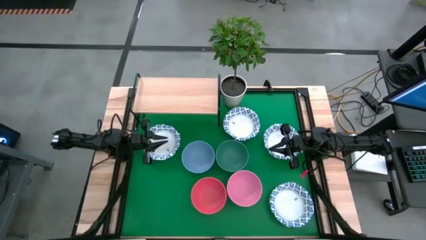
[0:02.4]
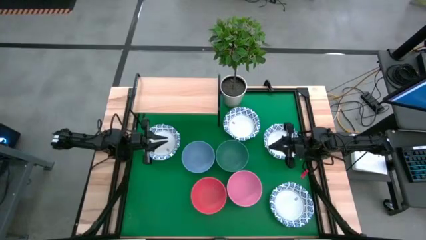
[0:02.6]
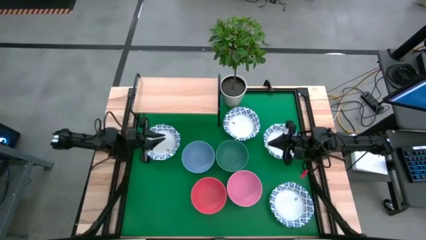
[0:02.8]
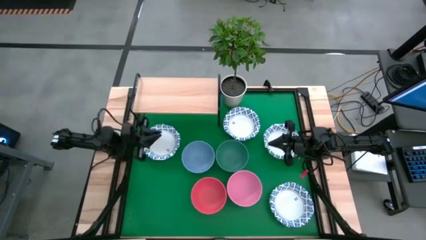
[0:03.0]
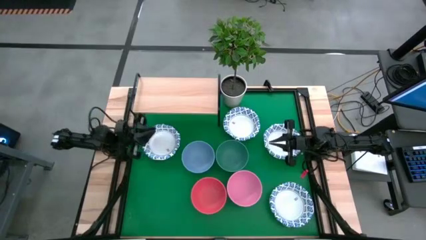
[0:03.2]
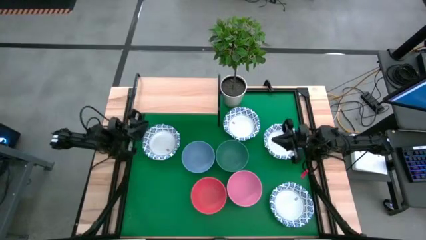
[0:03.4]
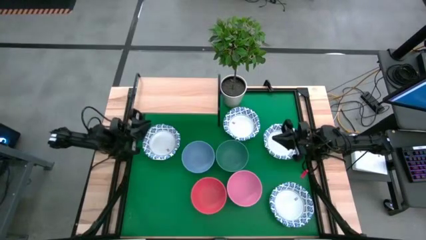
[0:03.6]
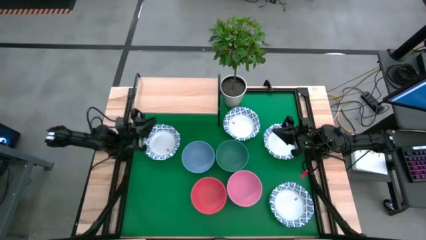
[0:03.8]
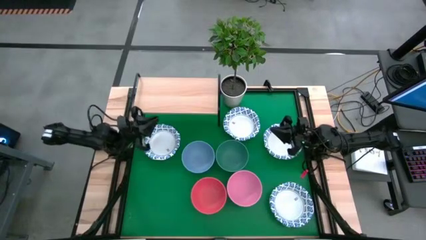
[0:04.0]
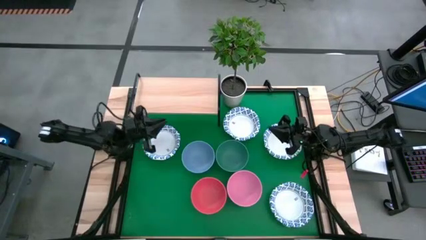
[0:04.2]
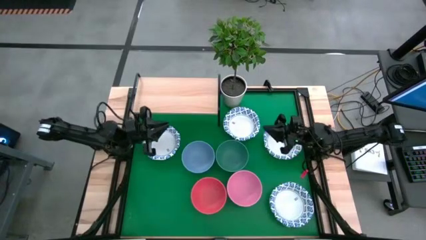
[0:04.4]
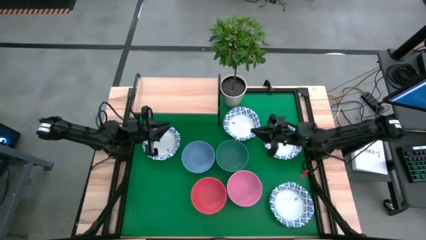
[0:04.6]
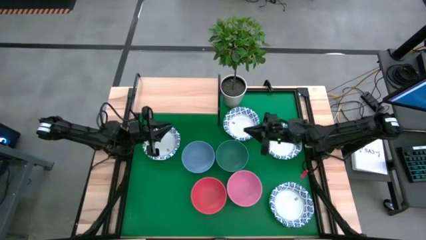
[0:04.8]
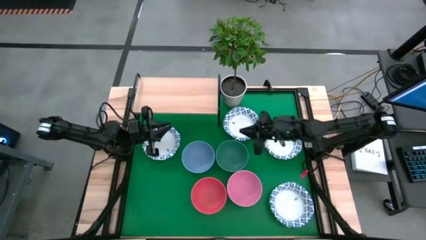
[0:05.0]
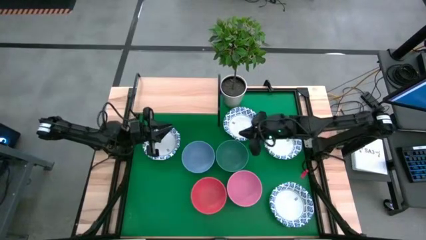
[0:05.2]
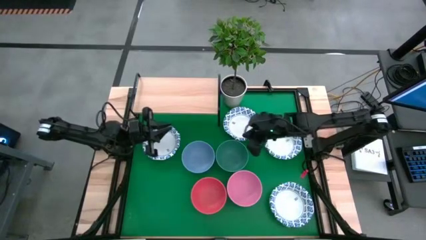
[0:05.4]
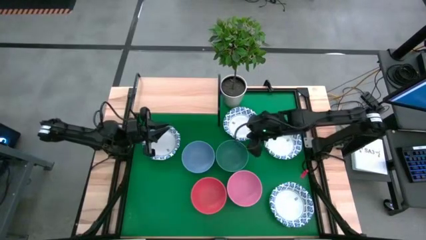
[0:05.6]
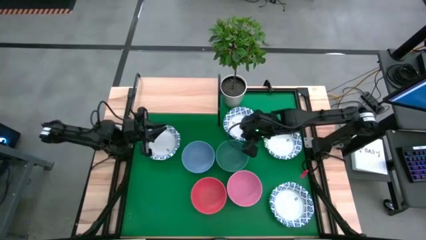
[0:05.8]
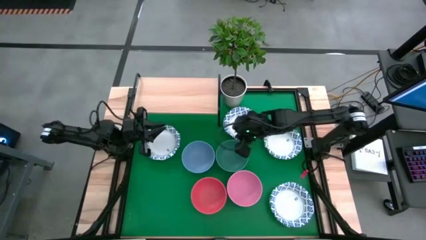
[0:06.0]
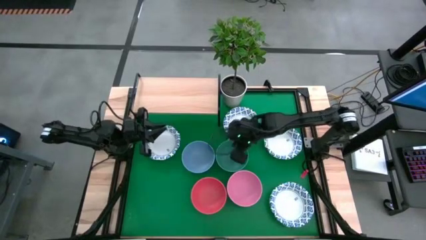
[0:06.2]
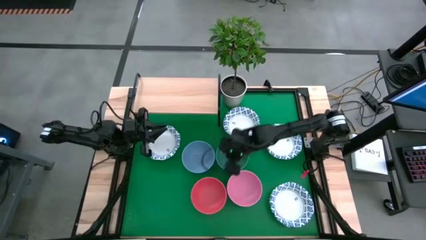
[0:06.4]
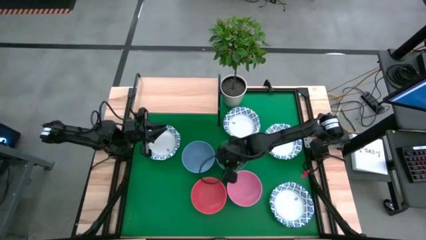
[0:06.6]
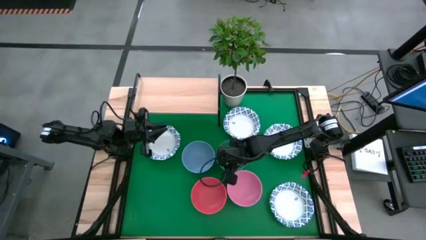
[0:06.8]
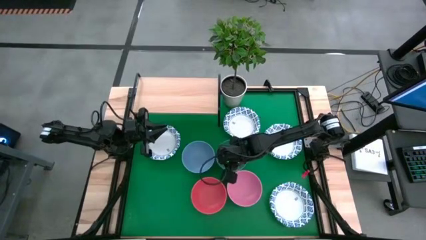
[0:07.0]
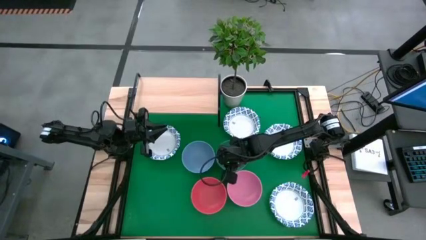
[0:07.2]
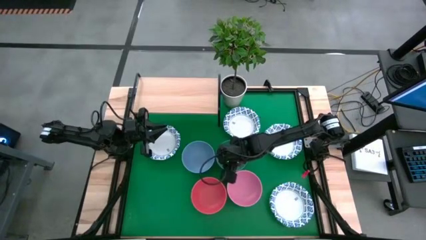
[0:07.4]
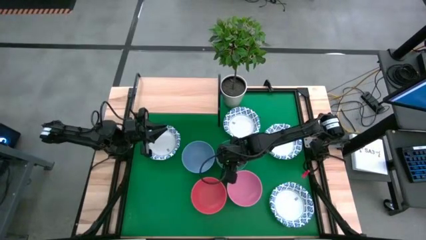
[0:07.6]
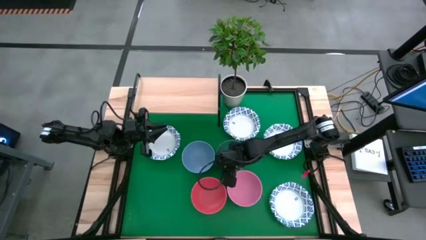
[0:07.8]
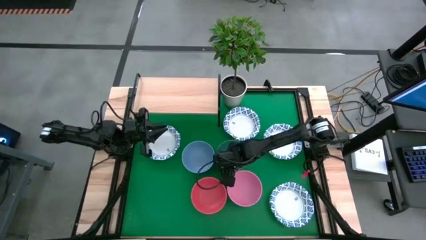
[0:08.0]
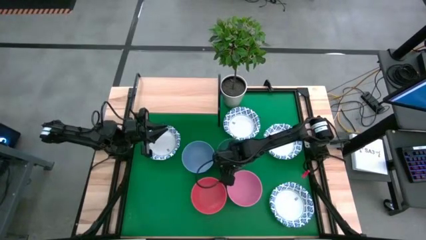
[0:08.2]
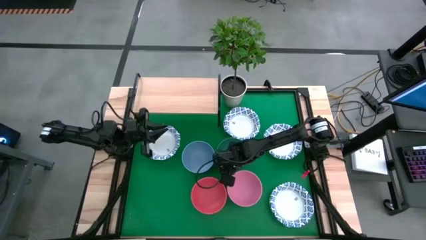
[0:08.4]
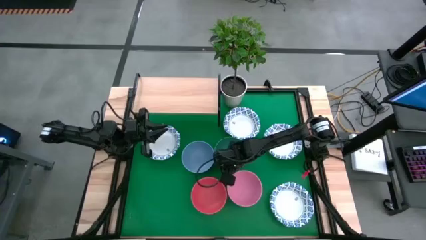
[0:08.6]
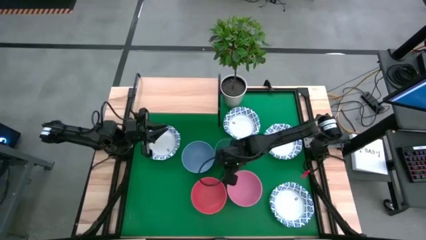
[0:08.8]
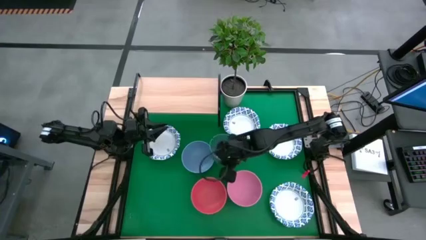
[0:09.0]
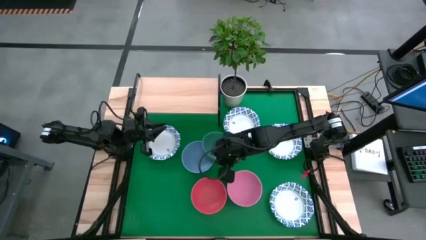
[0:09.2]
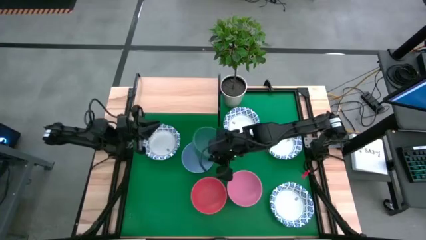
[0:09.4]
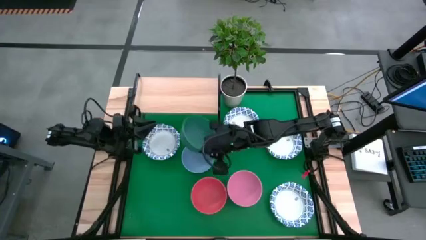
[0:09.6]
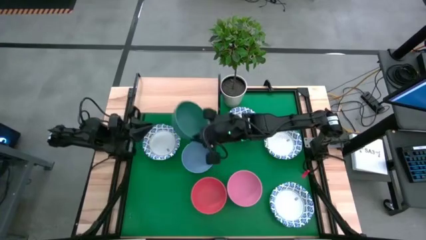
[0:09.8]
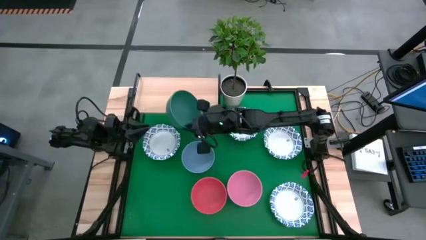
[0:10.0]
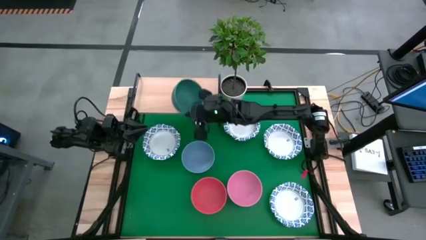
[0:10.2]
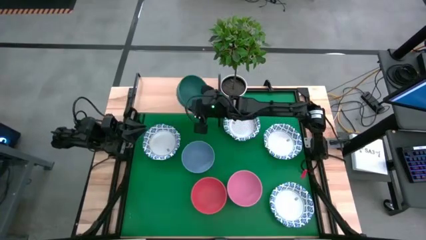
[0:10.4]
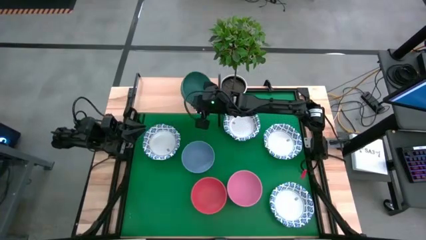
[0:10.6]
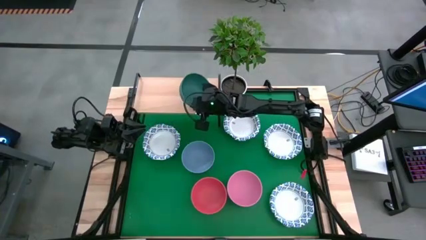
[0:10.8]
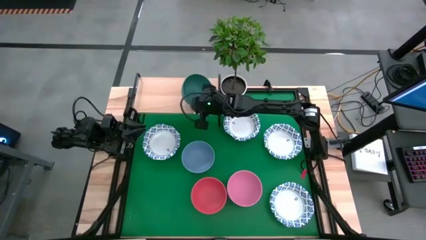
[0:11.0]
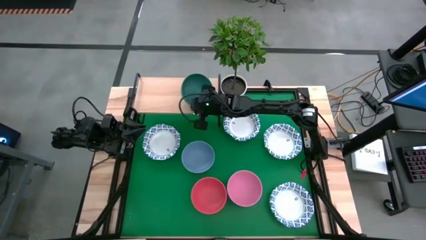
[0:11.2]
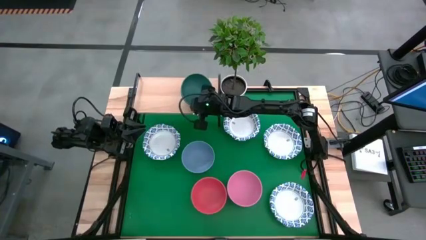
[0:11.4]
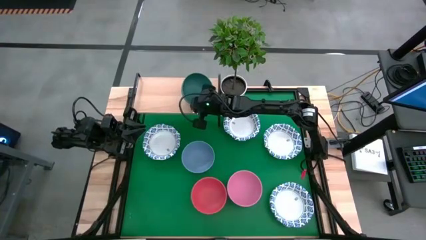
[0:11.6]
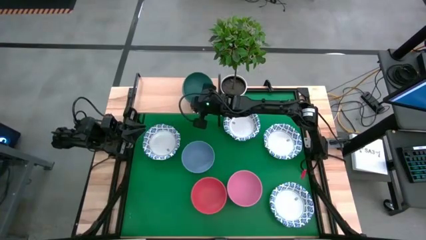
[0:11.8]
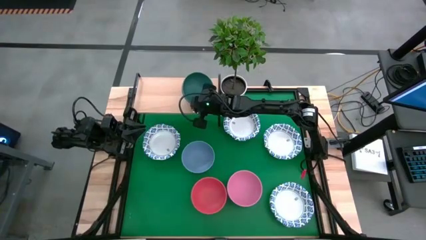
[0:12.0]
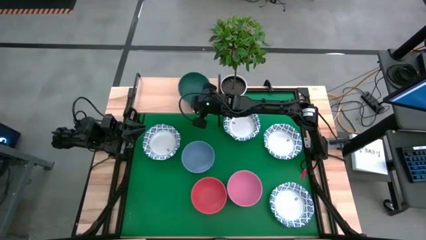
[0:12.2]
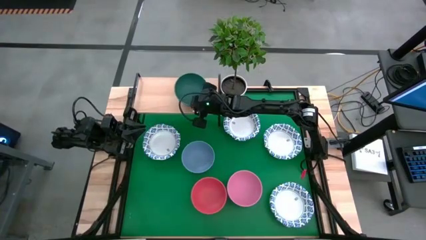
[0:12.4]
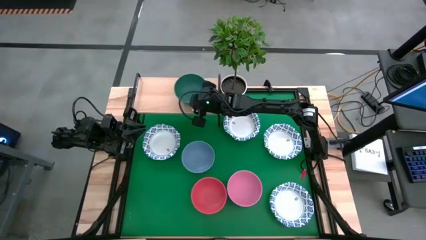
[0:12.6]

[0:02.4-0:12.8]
Task: Place and stack bowls onto a shelf
Put the green bowl on the shelf

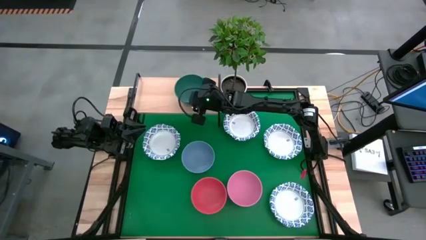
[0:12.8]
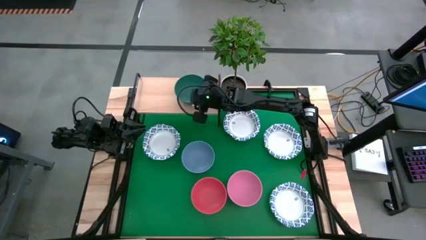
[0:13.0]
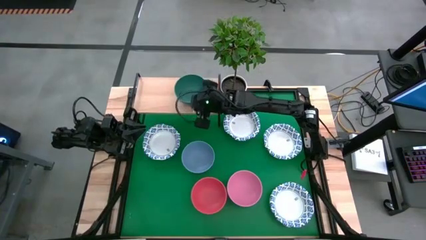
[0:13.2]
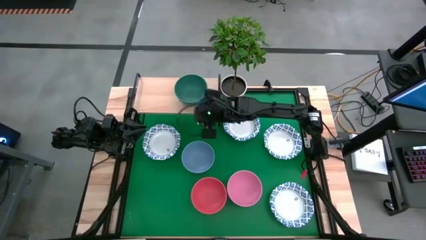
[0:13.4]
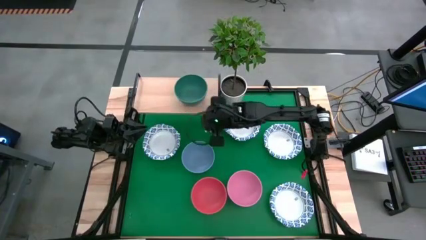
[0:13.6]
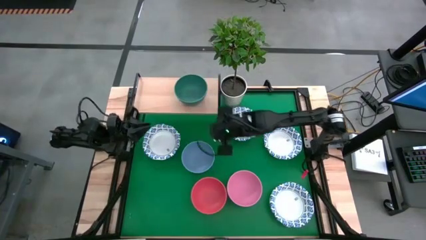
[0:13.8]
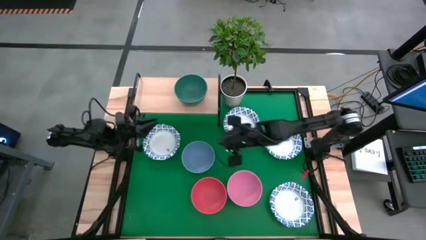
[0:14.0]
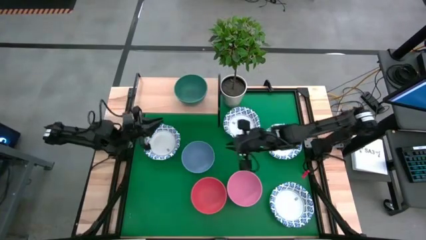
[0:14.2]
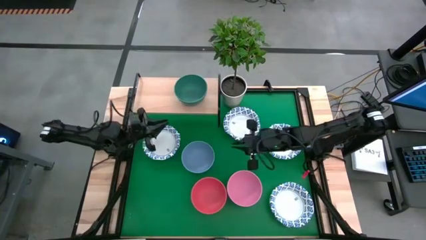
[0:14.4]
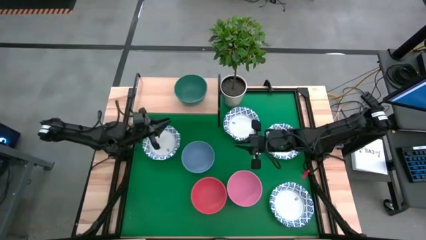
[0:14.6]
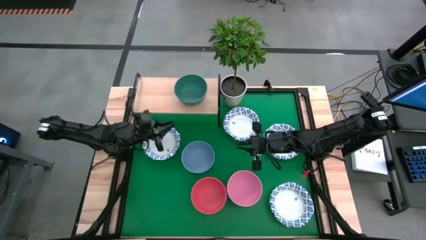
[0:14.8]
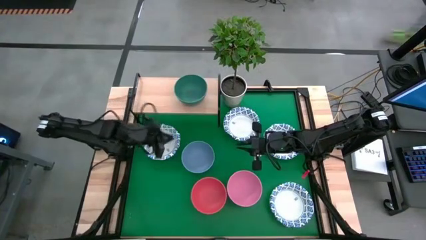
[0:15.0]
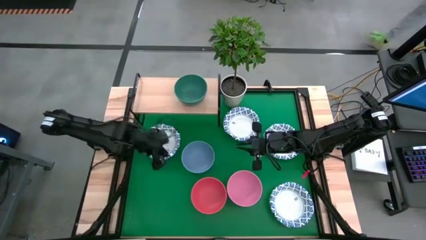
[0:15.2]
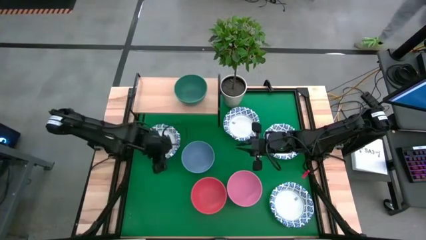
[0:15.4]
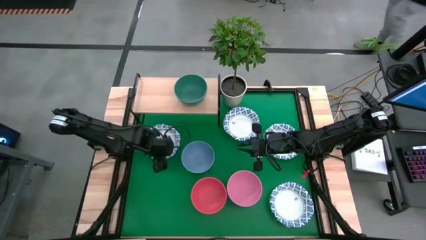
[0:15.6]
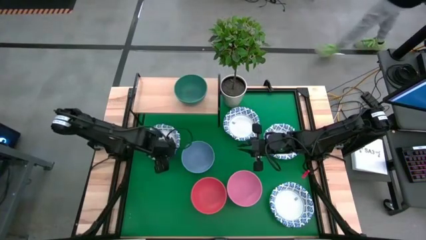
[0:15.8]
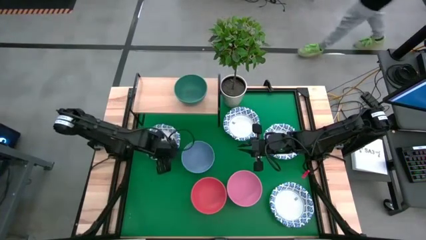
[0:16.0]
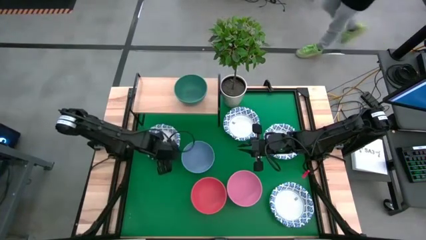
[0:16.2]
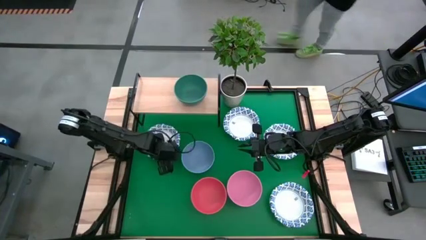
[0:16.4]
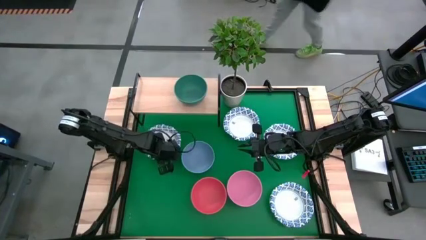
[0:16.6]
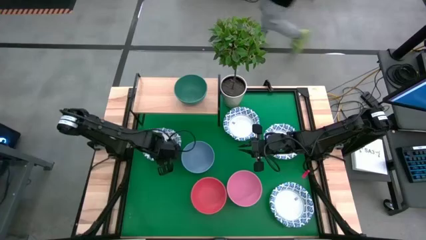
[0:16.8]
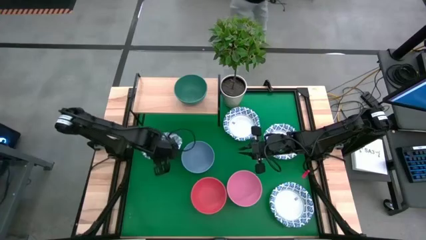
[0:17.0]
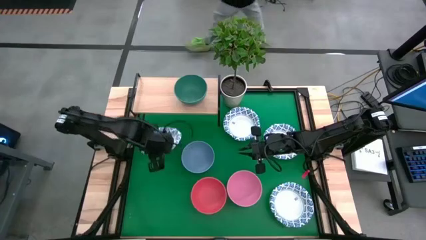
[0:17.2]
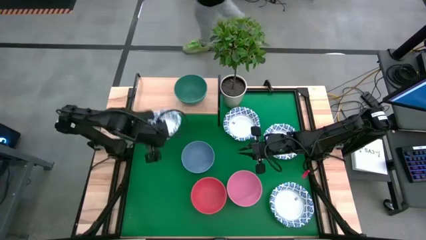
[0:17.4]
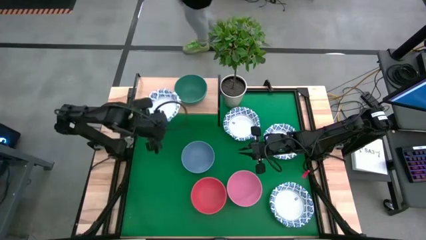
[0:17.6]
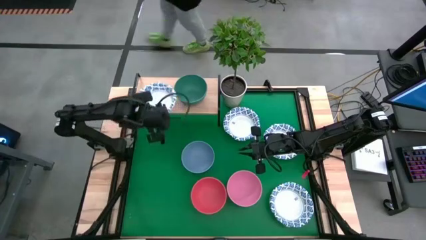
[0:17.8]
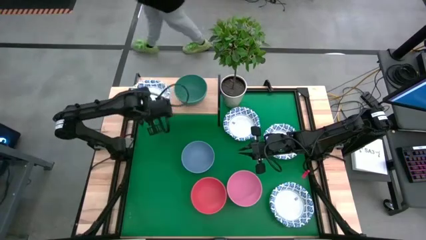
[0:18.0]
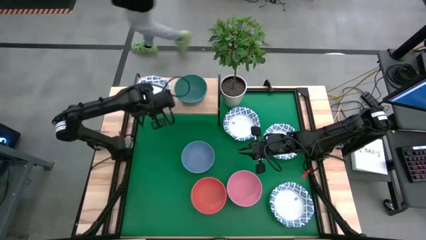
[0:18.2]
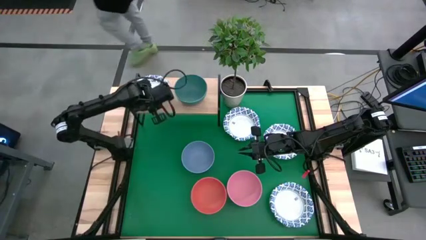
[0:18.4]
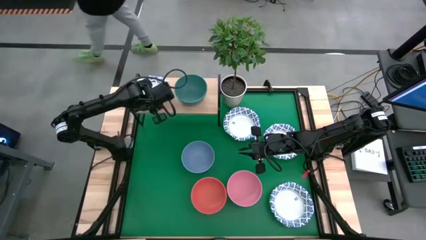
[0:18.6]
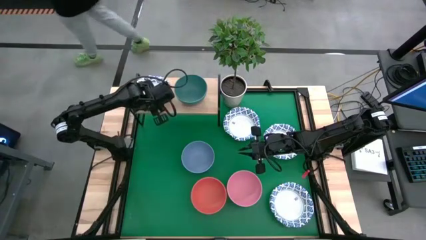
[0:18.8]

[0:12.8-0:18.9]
Put the white patterned bowl on the shelf
